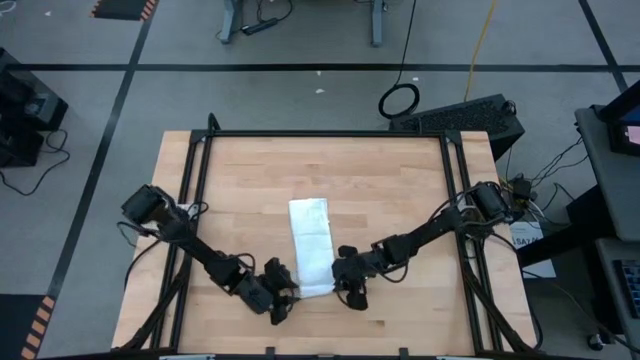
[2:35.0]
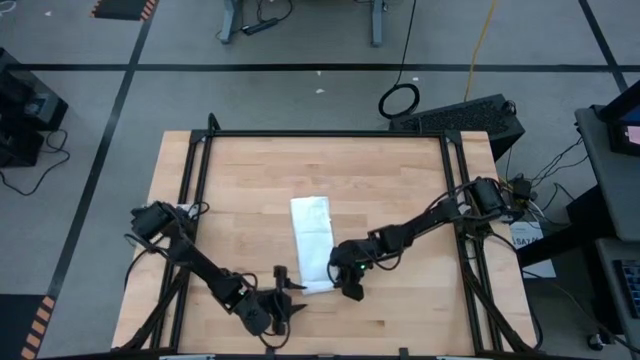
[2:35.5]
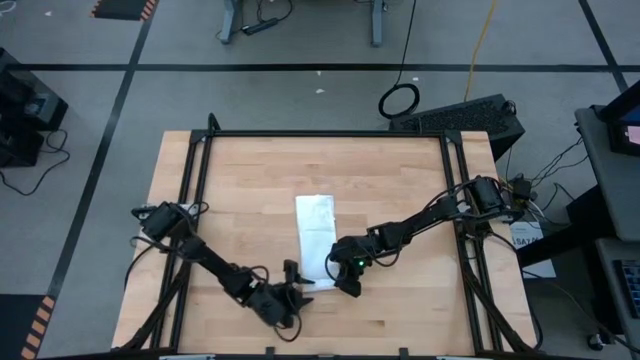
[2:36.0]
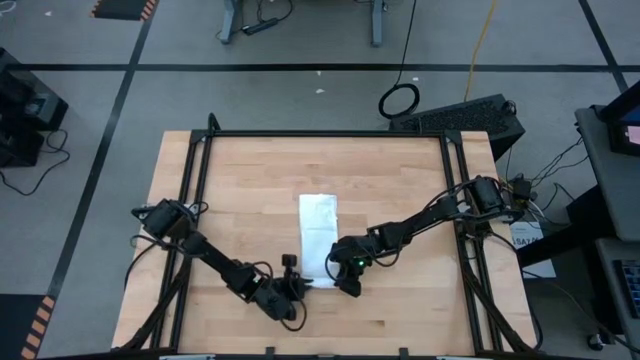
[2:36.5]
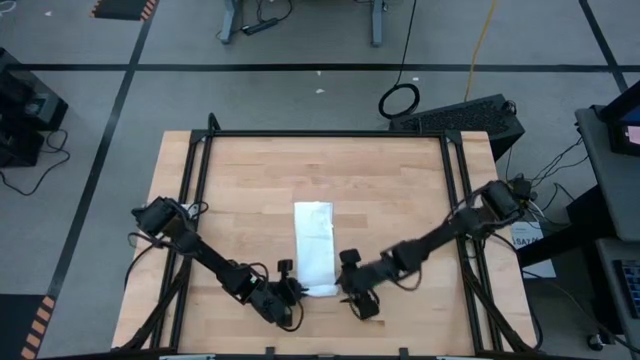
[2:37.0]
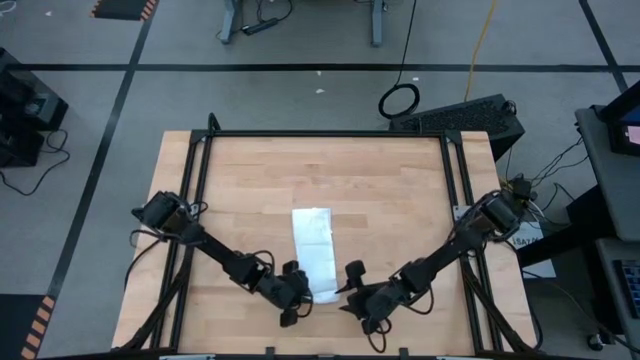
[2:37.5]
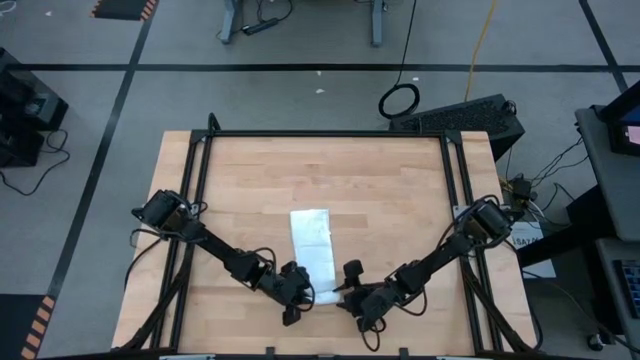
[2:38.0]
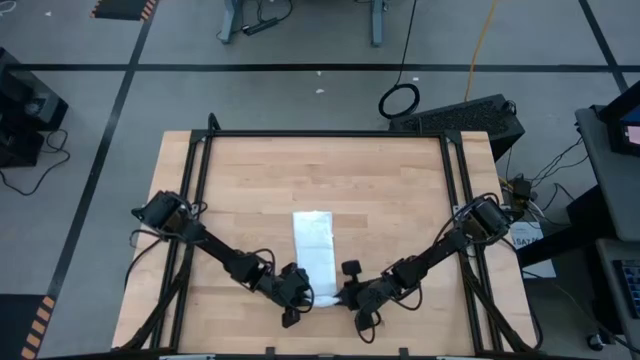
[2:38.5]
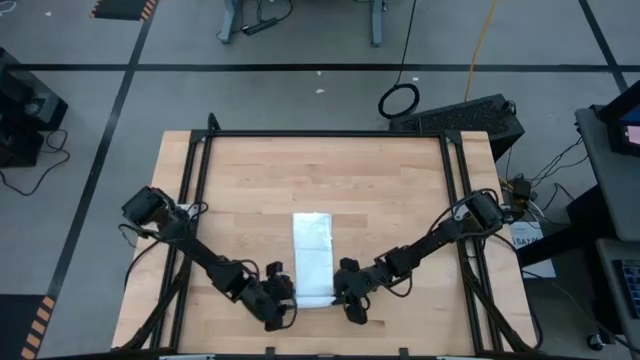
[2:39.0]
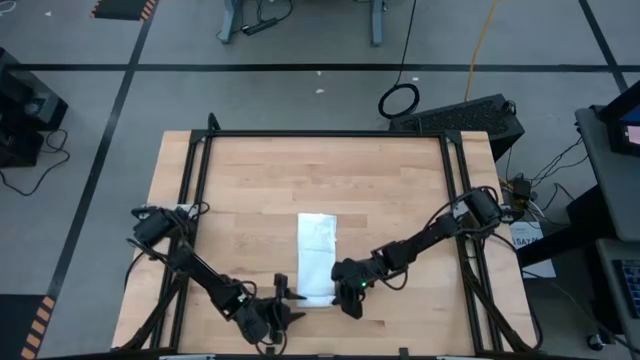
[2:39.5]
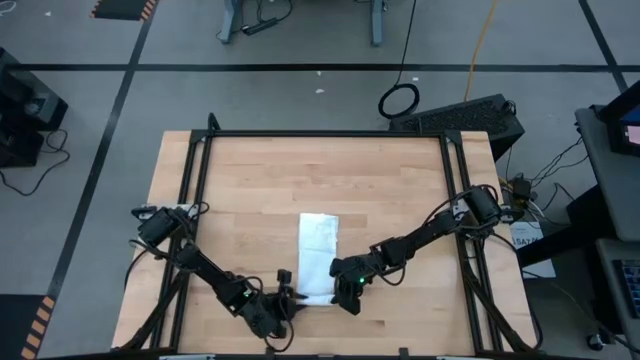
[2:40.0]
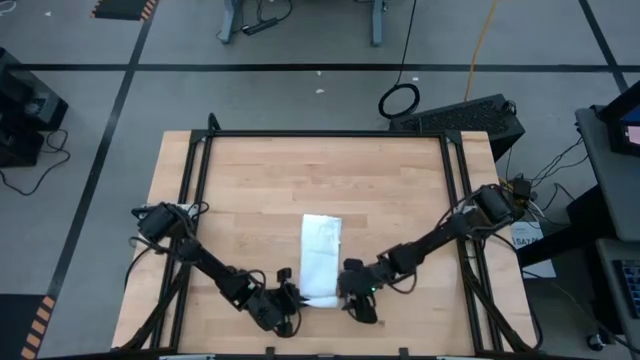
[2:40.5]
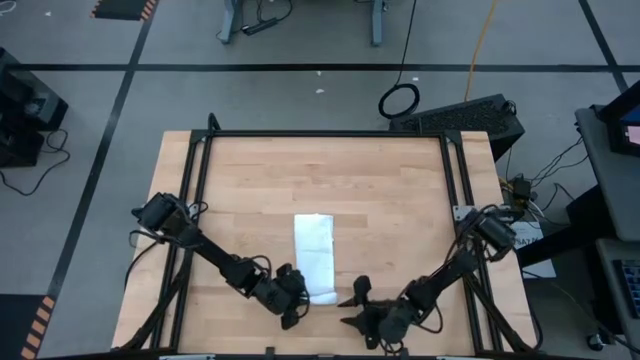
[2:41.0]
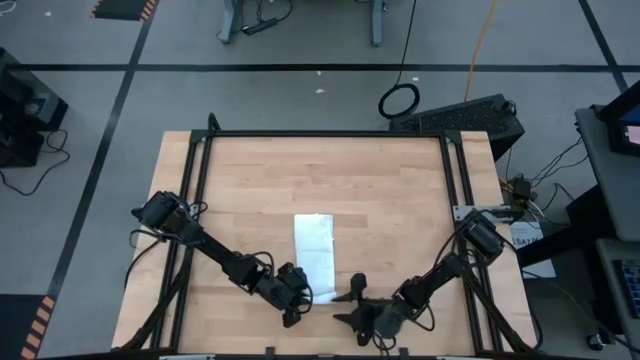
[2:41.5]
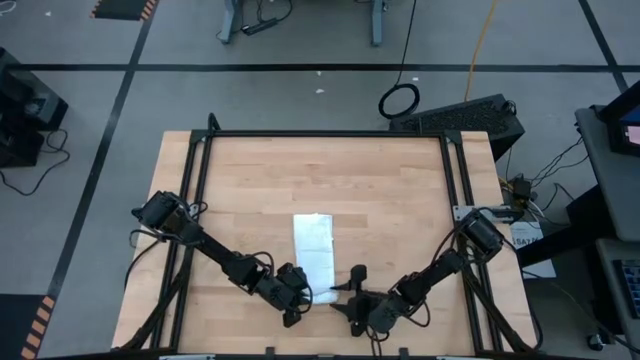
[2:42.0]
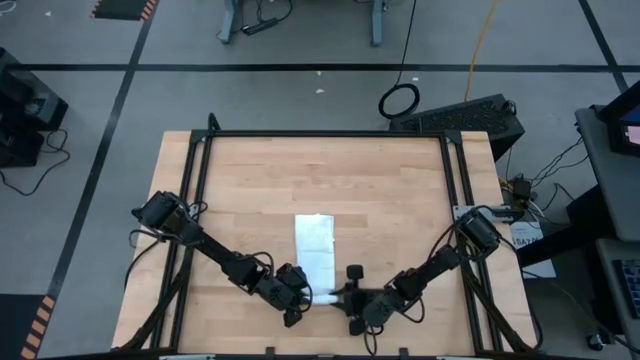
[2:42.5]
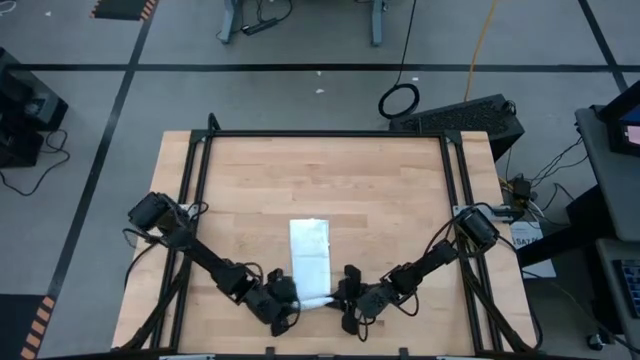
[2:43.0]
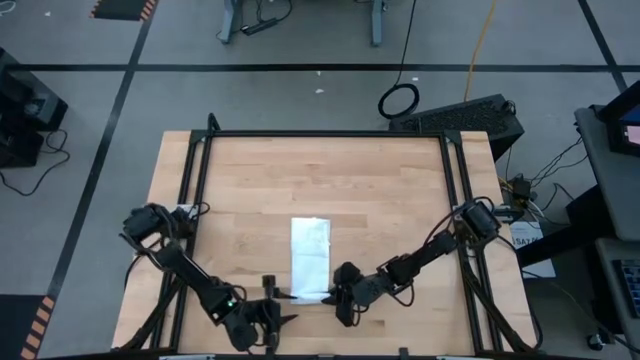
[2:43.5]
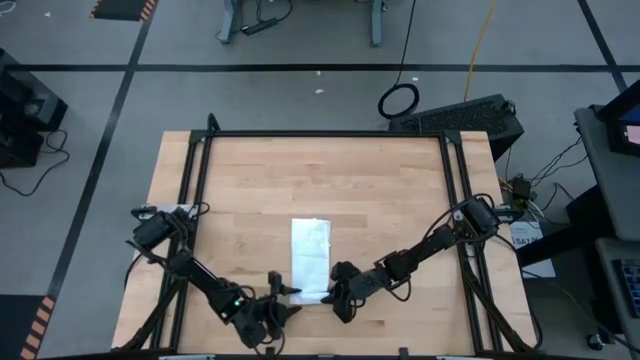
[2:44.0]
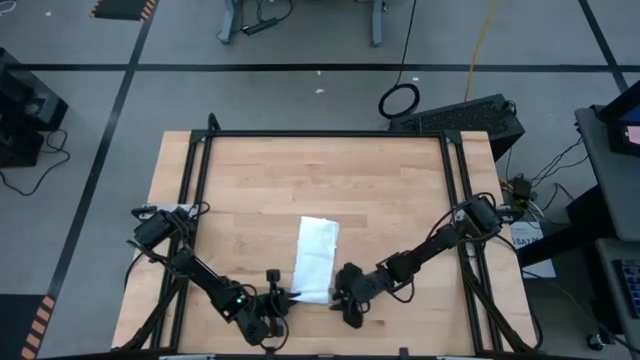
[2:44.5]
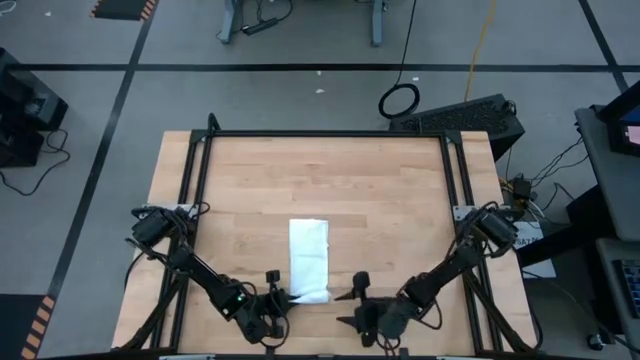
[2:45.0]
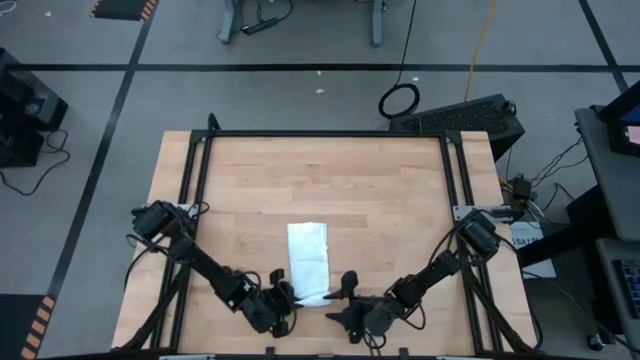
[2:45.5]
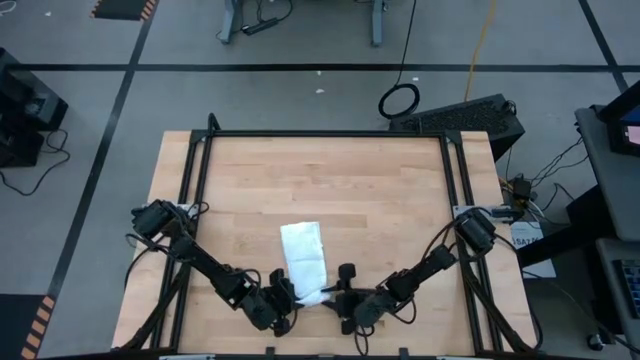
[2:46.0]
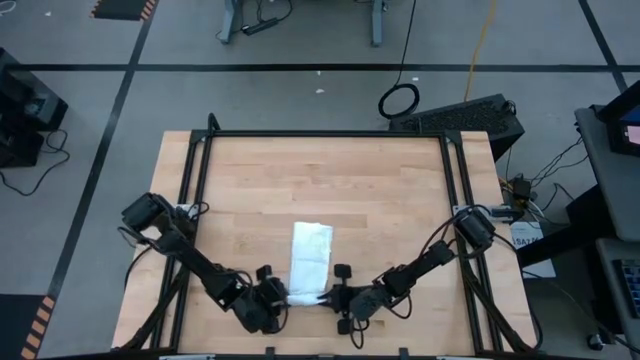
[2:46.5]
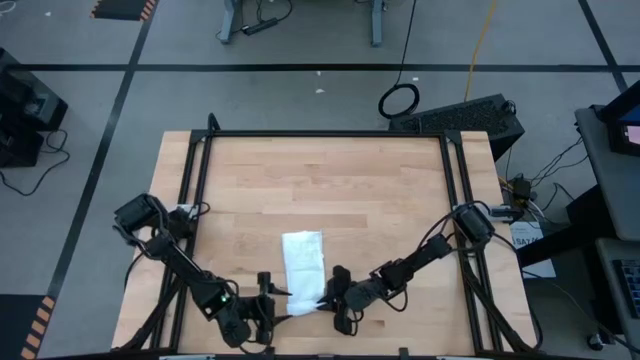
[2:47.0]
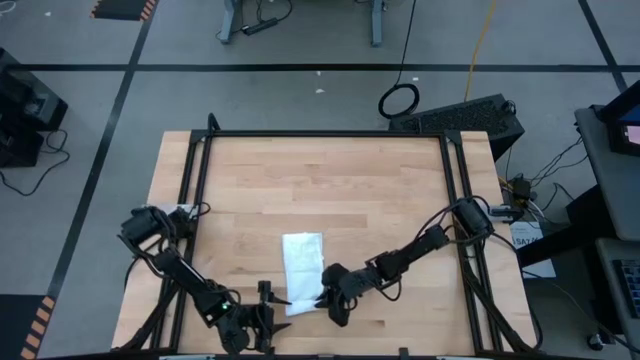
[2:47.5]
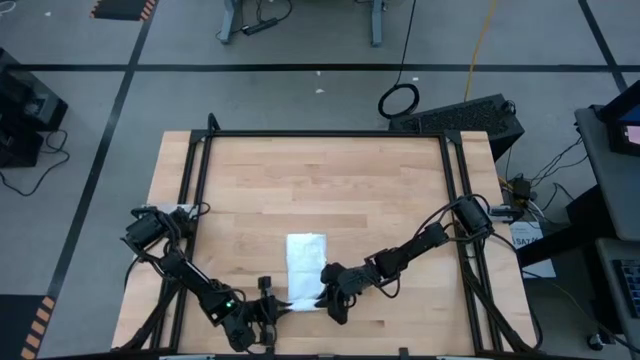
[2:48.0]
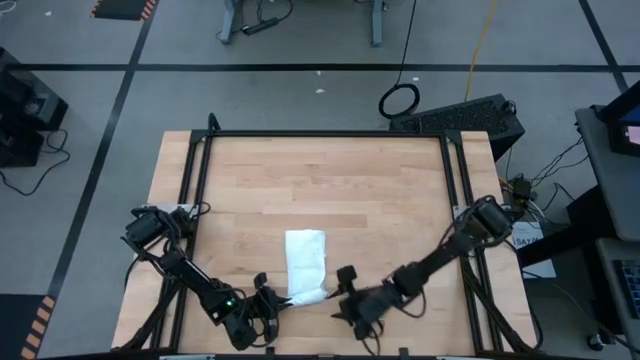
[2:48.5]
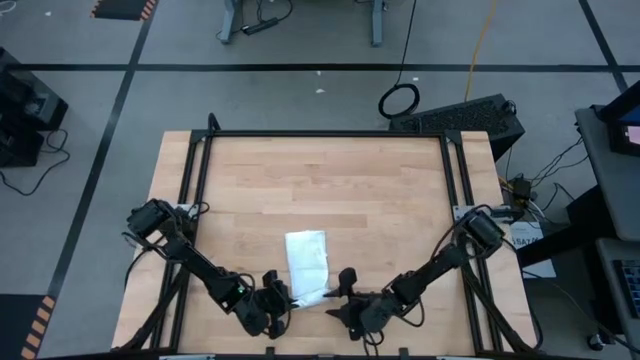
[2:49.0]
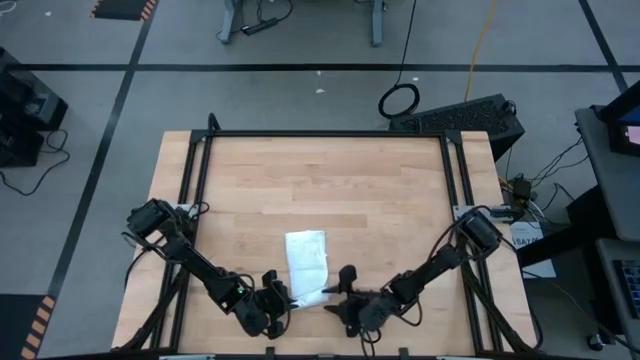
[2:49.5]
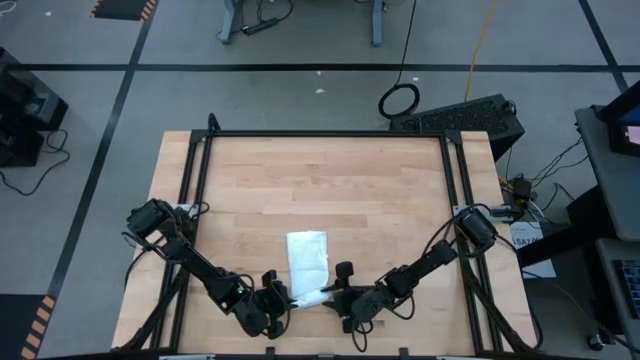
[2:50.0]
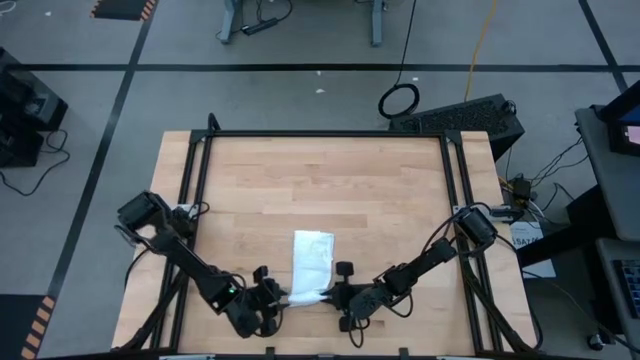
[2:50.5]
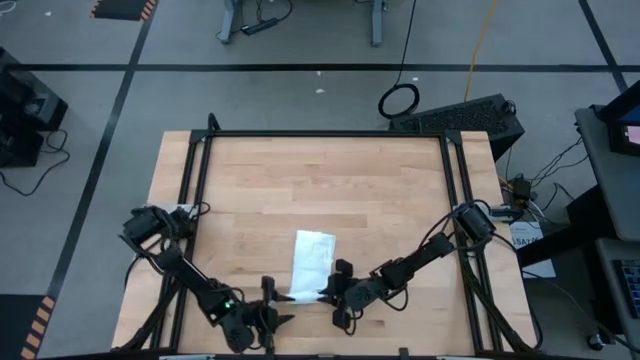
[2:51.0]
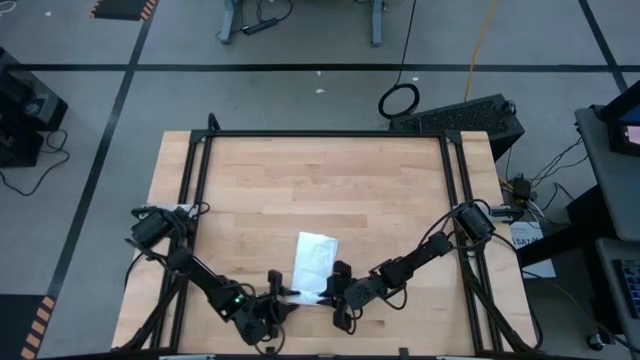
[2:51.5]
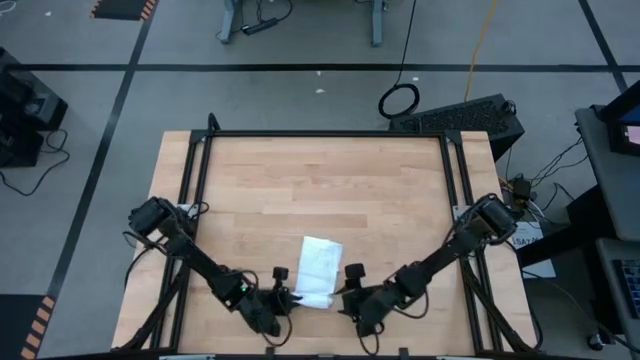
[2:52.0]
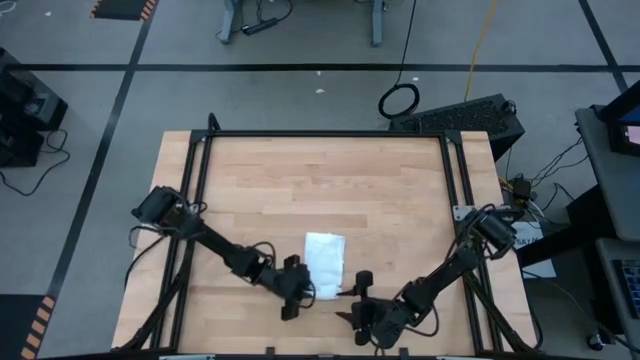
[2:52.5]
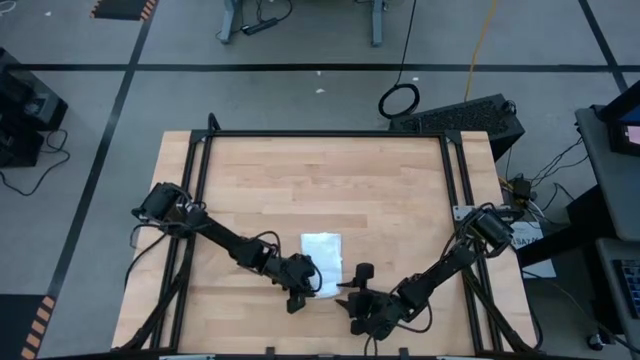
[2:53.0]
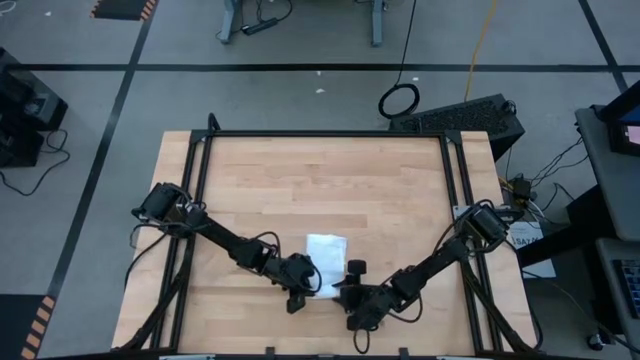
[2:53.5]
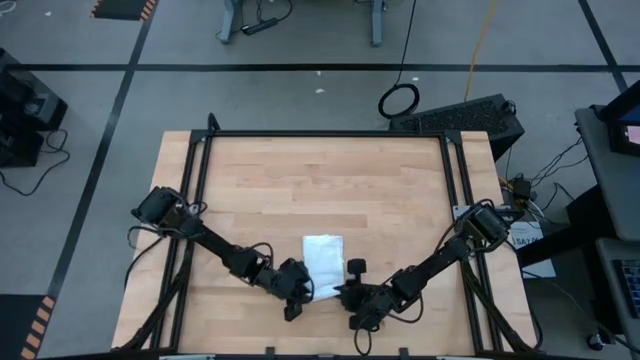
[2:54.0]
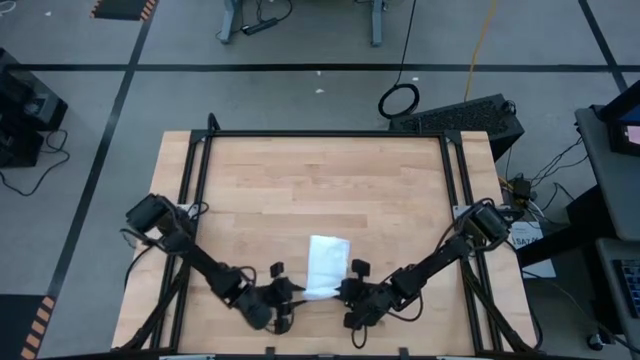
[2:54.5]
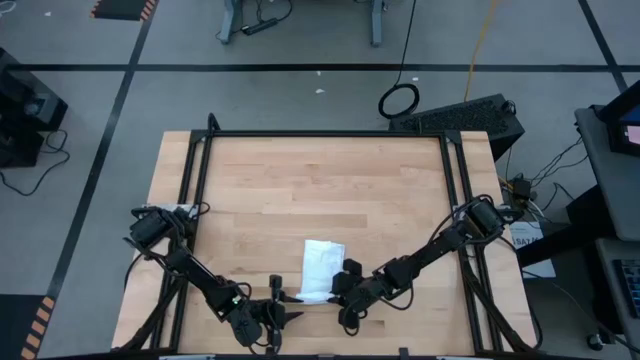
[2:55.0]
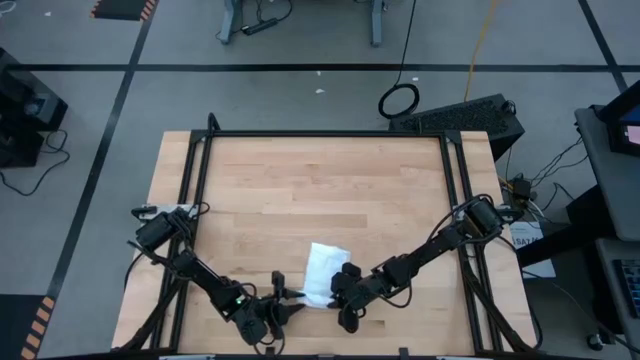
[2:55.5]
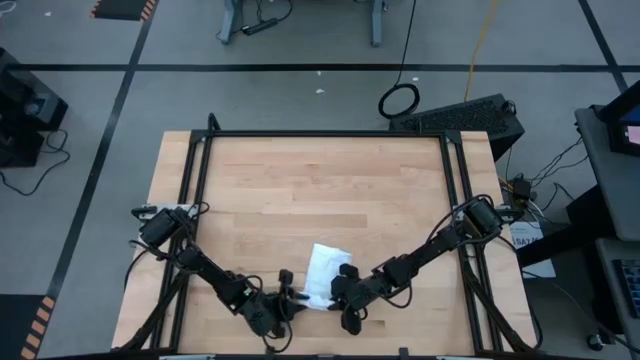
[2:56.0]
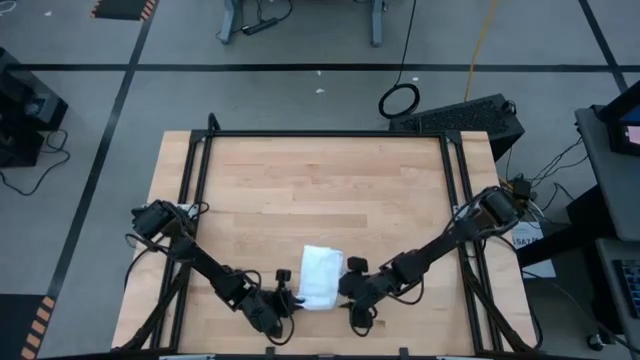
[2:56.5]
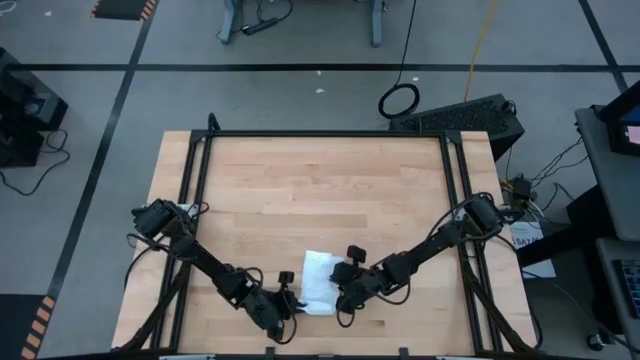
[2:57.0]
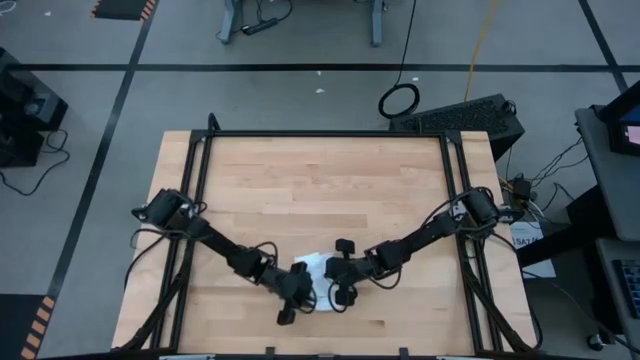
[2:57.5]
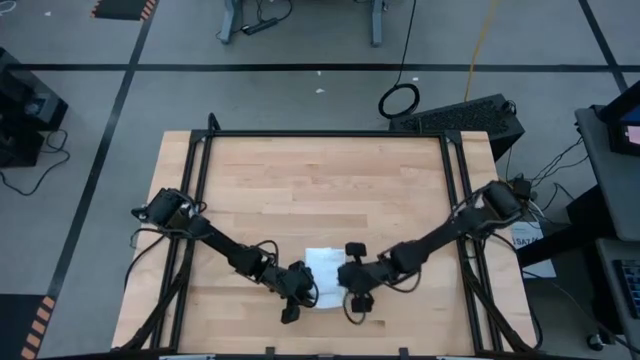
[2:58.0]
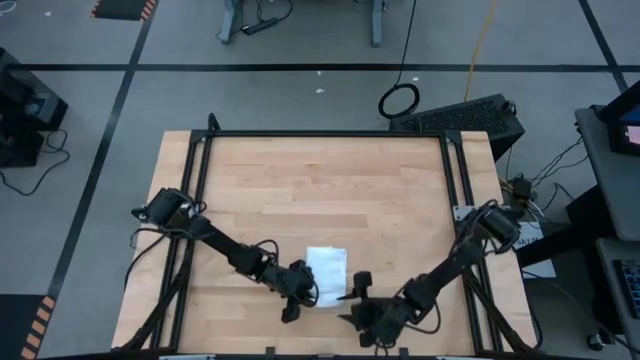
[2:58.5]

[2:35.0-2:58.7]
Task: Roll napkin
Roll the white table napkin
